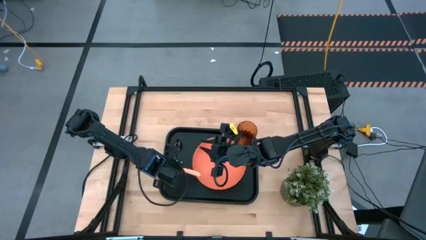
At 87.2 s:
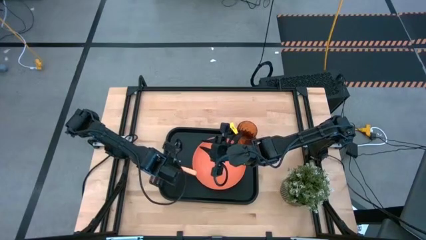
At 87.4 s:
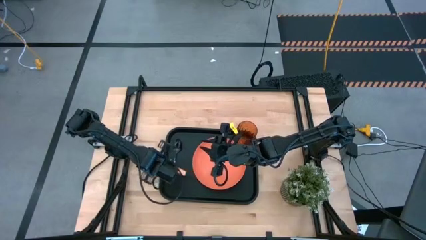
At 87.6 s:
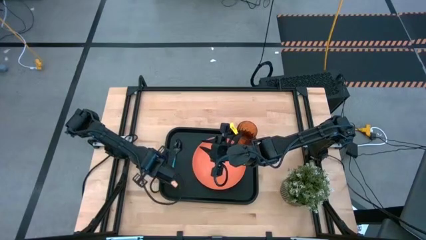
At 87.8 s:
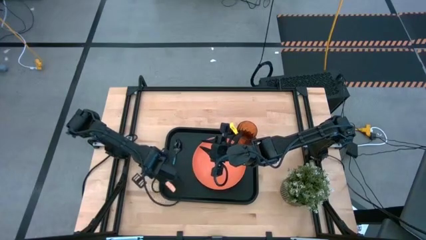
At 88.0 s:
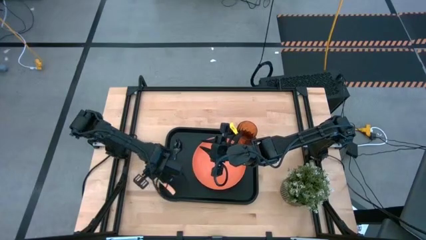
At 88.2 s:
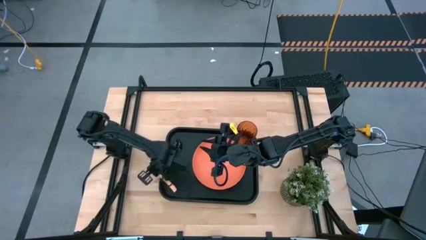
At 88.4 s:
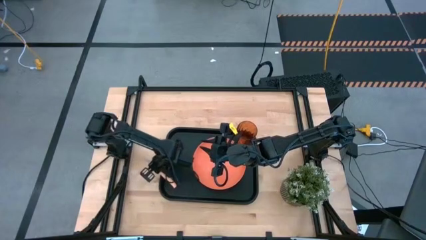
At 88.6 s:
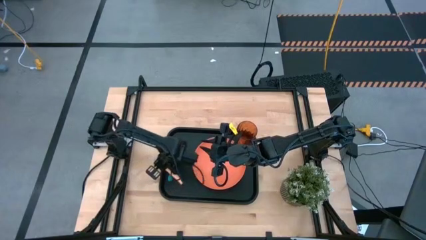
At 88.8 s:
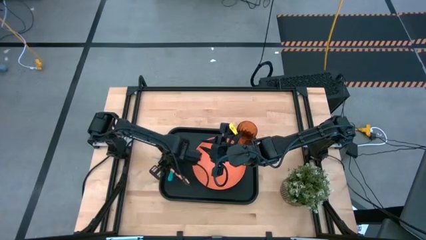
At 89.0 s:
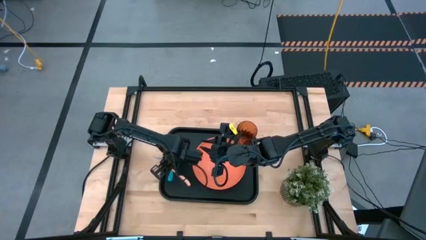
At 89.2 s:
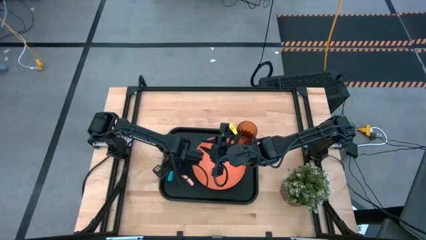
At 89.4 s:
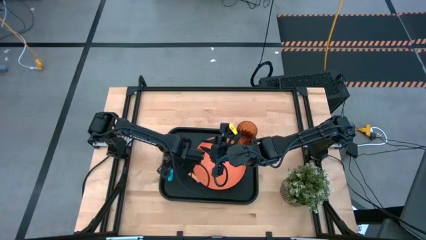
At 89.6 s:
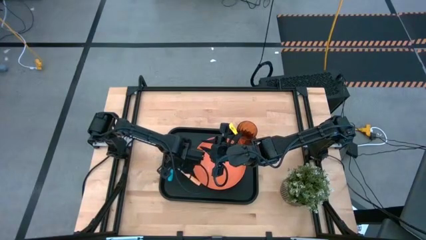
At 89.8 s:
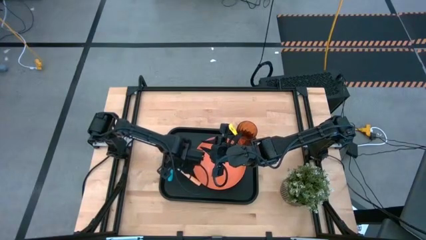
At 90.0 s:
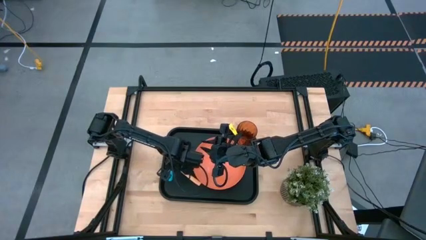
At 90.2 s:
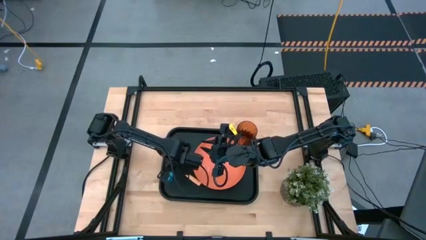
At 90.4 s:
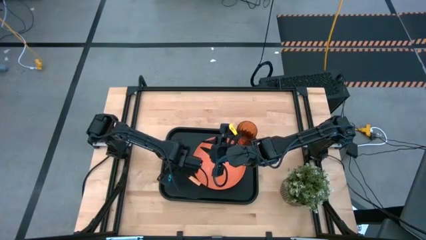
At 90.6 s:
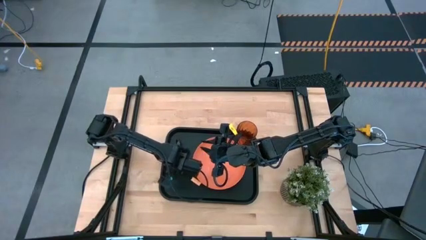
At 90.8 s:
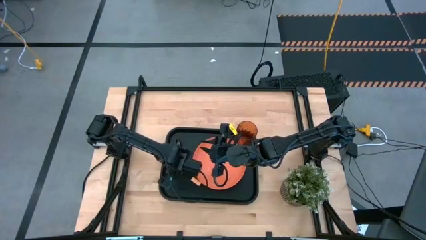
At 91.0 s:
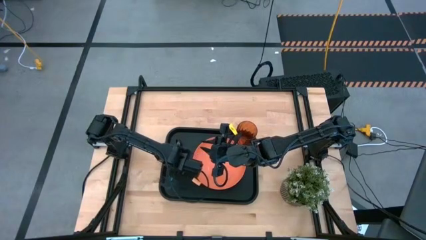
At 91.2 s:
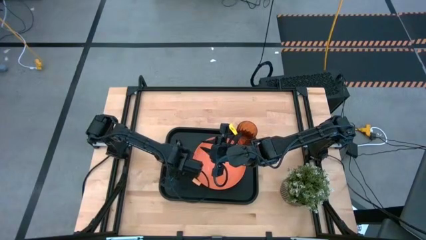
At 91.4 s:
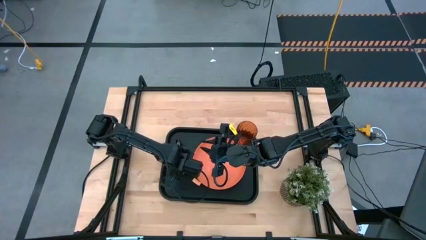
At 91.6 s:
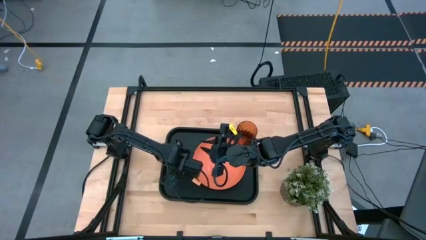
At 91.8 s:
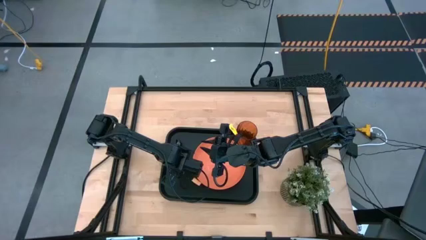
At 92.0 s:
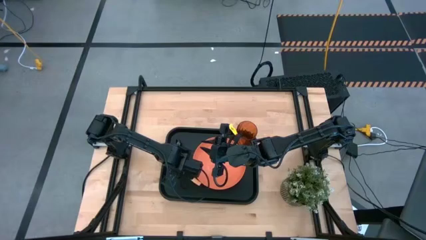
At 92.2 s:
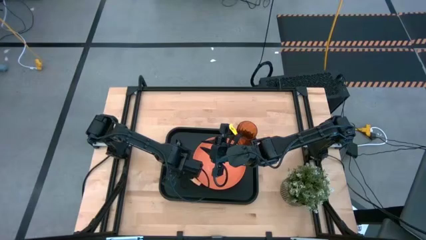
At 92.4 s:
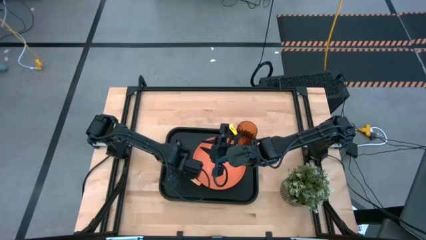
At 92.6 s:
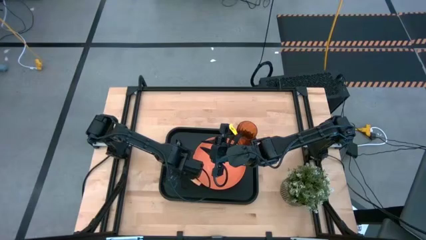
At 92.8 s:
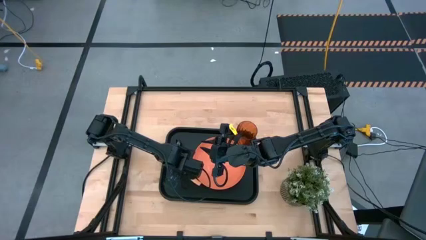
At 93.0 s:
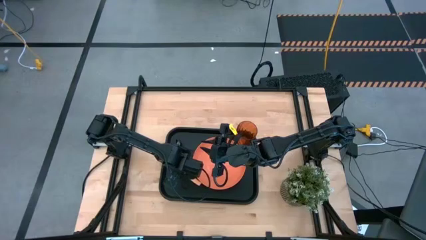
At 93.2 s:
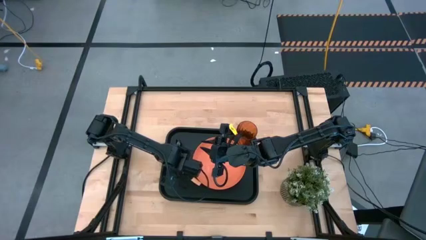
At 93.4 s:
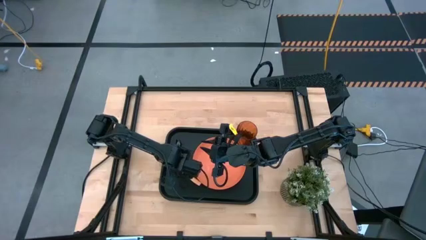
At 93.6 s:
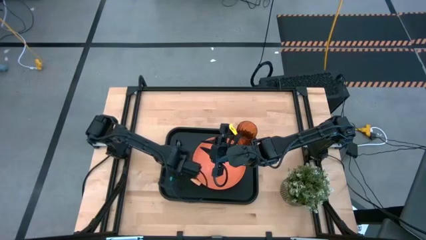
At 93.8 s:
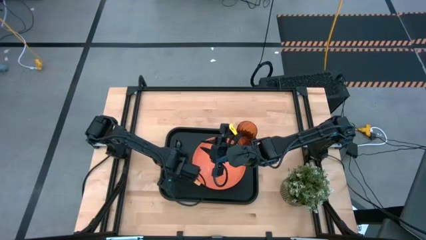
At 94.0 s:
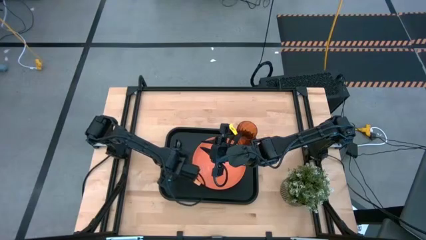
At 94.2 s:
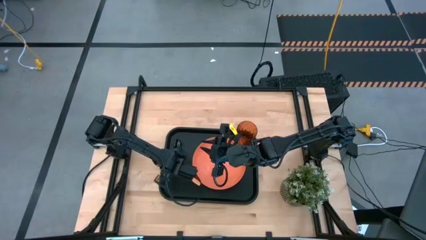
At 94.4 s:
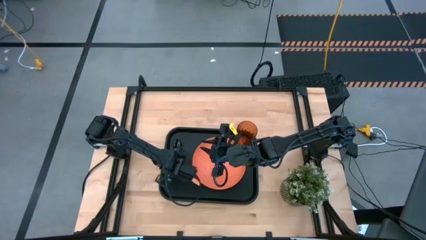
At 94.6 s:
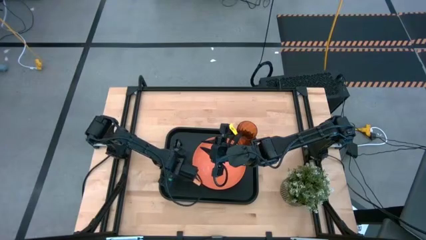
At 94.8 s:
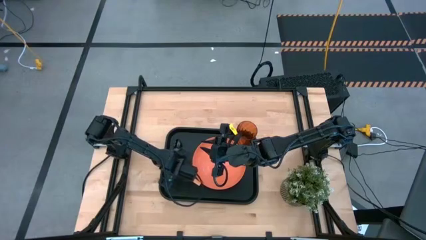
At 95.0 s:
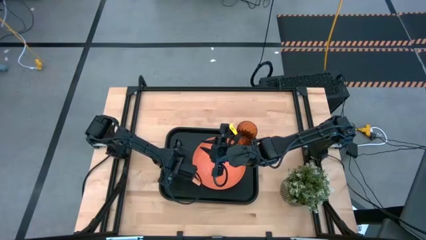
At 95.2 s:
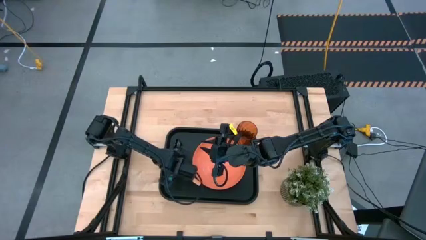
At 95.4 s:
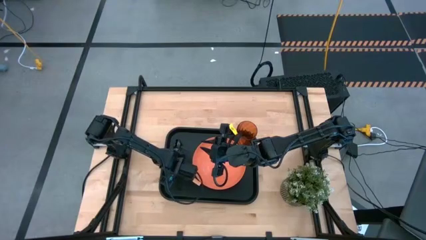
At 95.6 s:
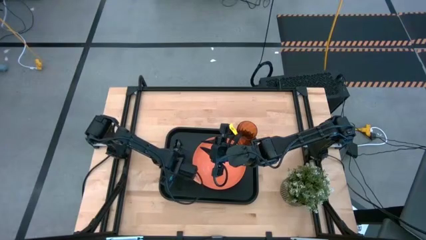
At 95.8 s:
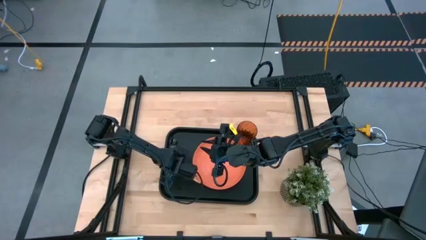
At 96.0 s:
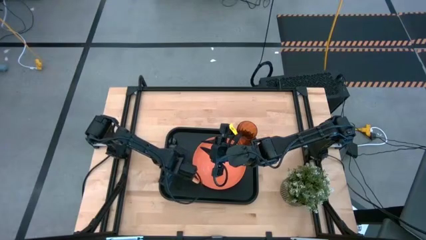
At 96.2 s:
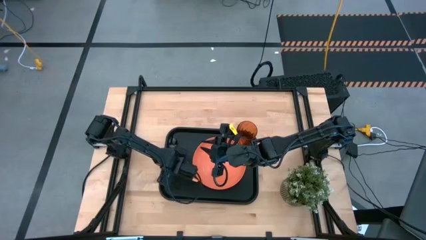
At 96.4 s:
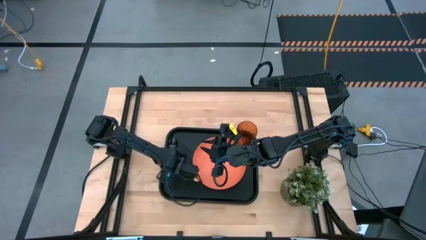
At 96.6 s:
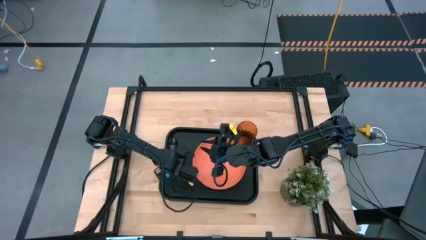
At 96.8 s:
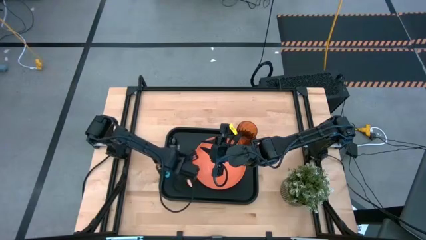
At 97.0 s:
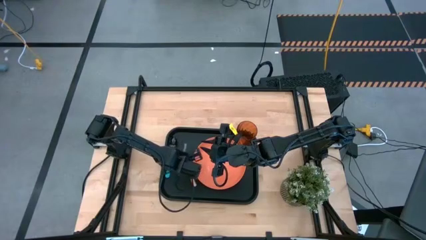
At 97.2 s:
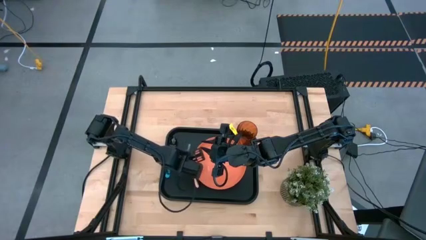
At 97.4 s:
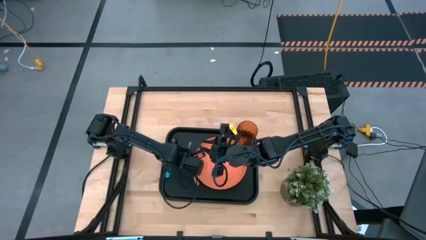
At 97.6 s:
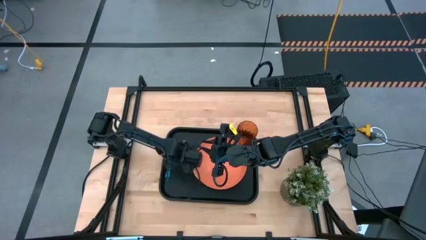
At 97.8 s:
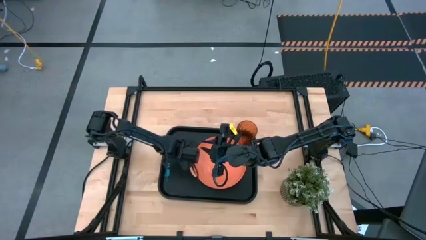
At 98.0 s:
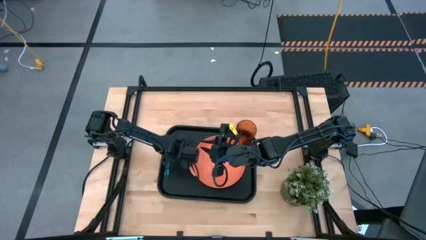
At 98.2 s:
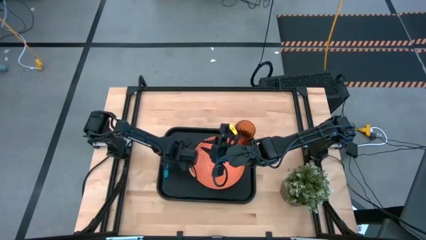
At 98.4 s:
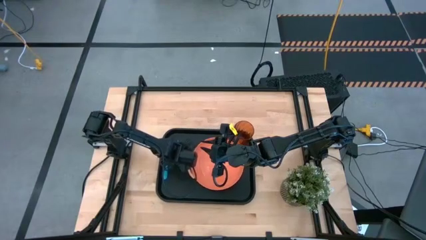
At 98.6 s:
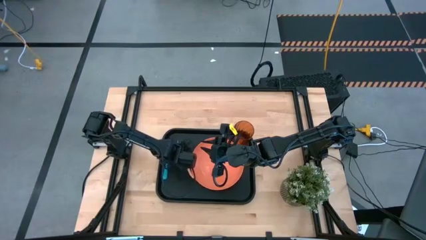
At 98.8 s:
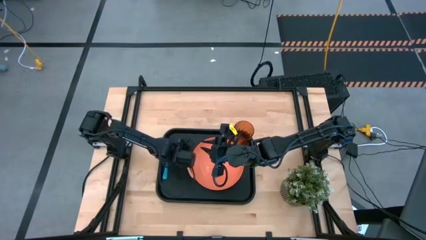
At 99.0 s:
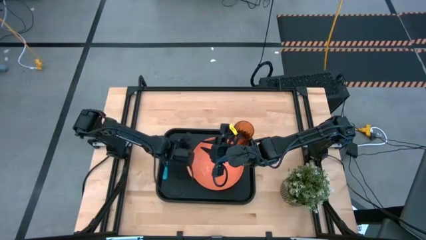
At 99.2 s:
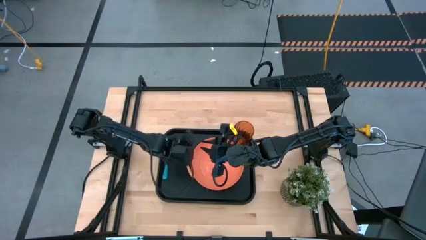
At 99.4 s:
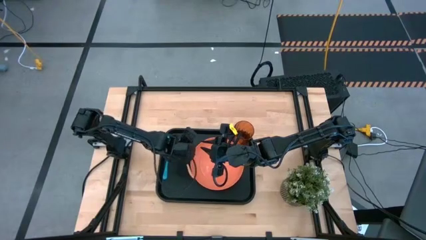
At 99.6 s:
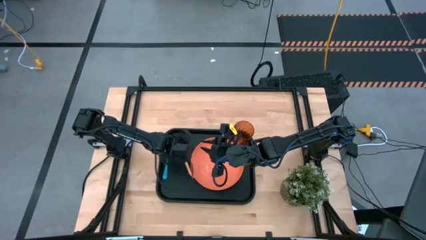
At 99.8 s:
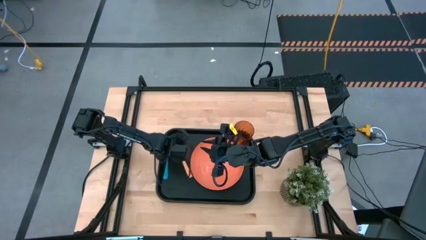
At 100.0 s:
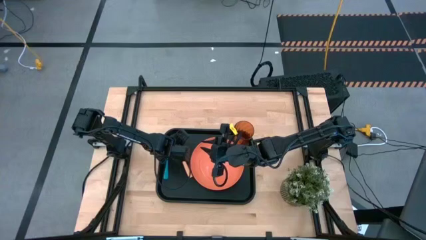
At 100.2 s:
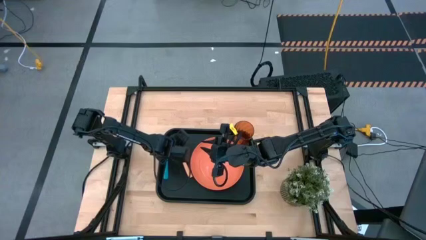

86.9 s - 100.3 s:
Task: Pick and place plate/cup/fork/spoon on tray
Put the pink fork on the black serving tray
